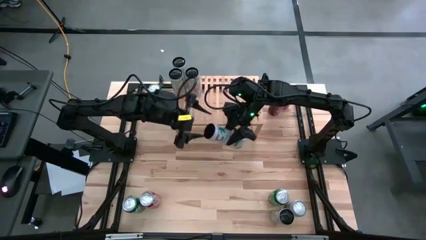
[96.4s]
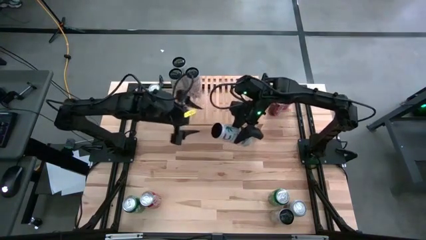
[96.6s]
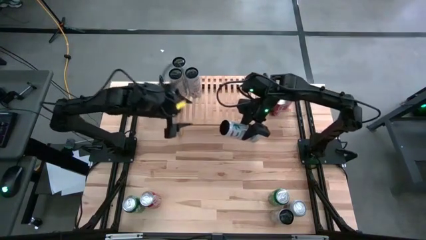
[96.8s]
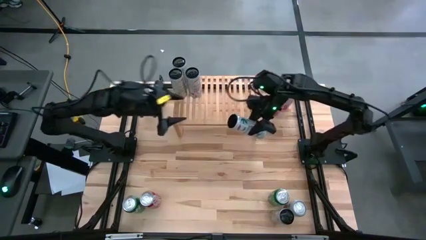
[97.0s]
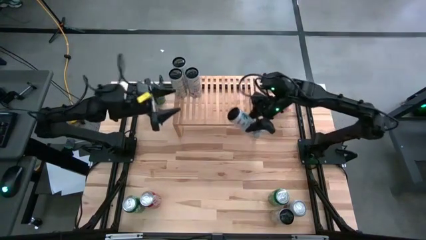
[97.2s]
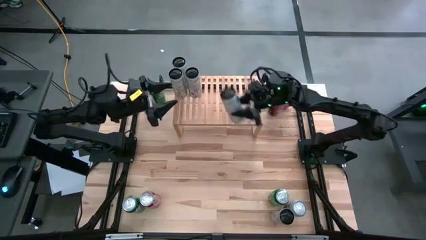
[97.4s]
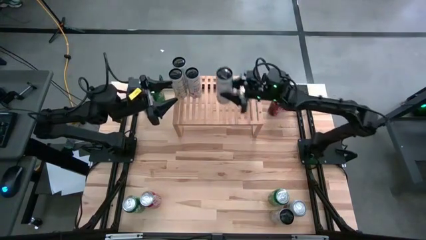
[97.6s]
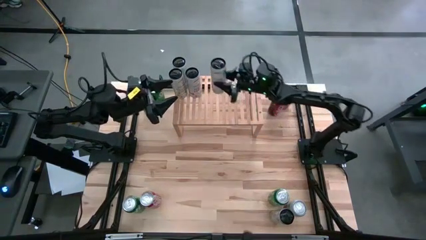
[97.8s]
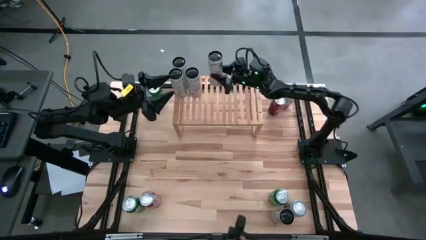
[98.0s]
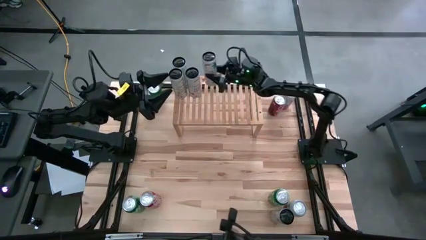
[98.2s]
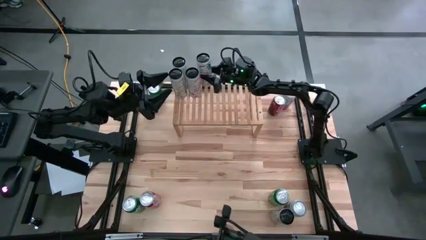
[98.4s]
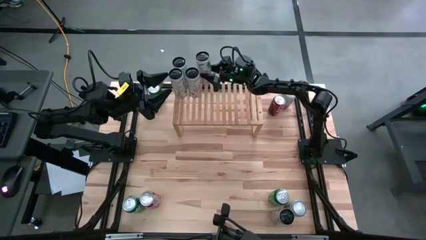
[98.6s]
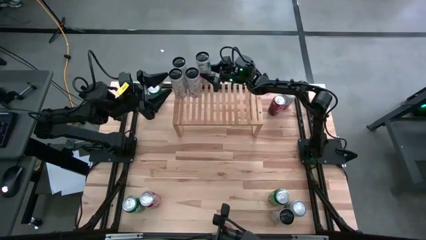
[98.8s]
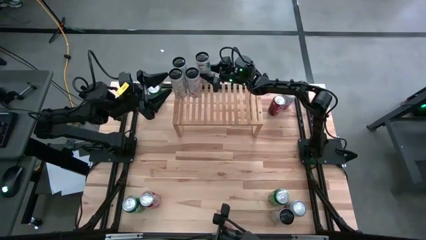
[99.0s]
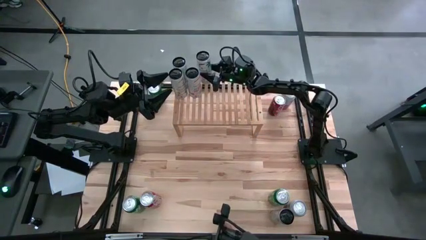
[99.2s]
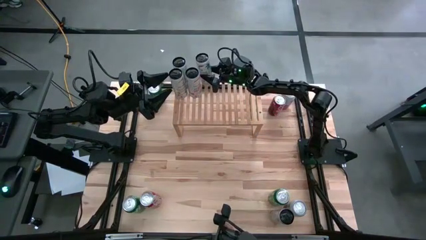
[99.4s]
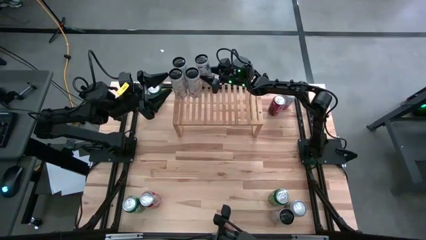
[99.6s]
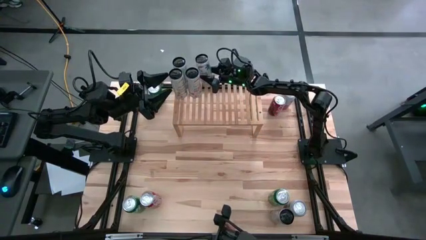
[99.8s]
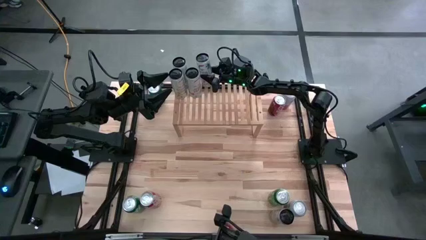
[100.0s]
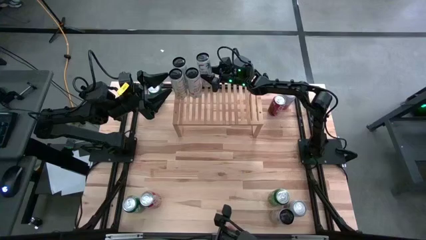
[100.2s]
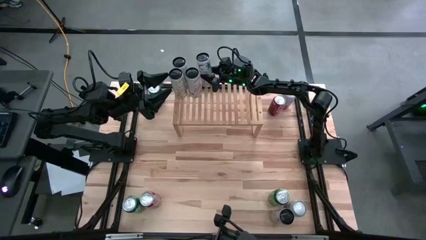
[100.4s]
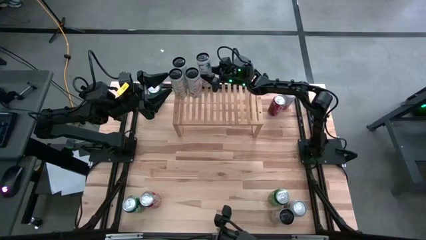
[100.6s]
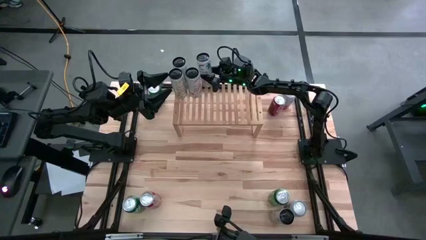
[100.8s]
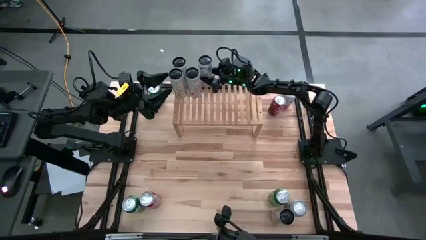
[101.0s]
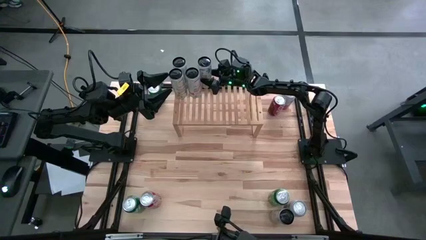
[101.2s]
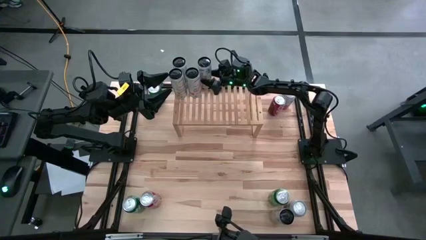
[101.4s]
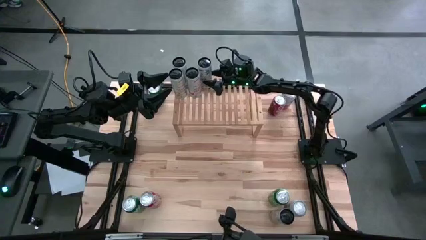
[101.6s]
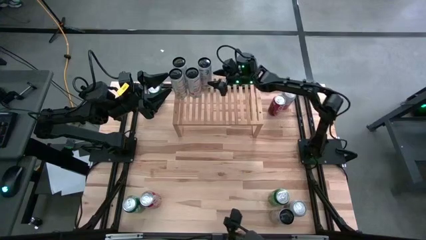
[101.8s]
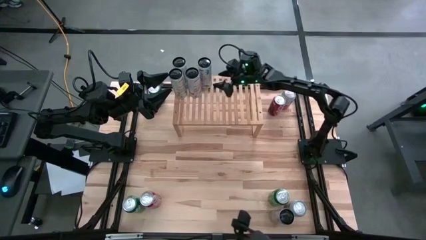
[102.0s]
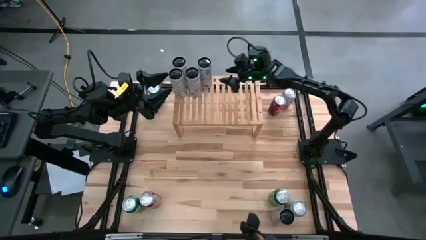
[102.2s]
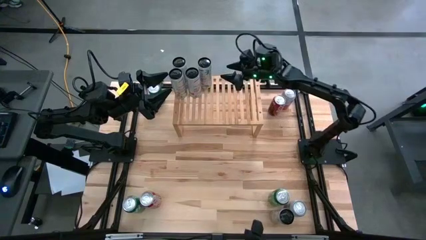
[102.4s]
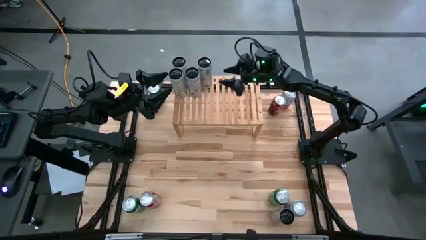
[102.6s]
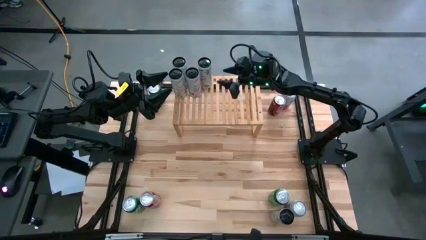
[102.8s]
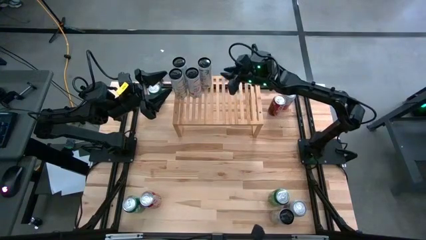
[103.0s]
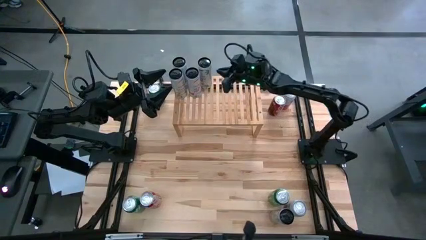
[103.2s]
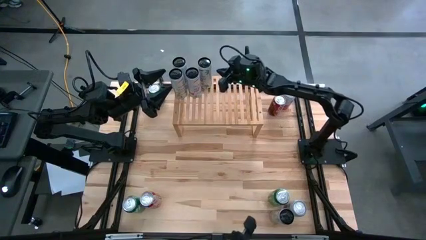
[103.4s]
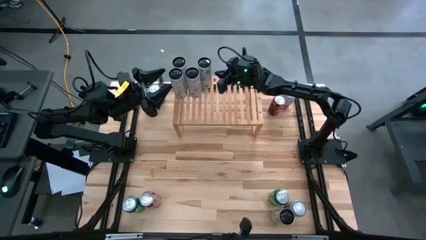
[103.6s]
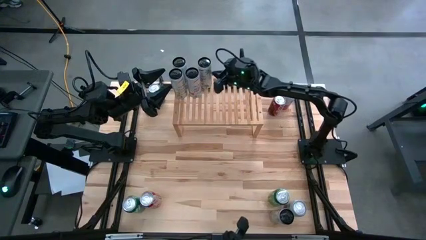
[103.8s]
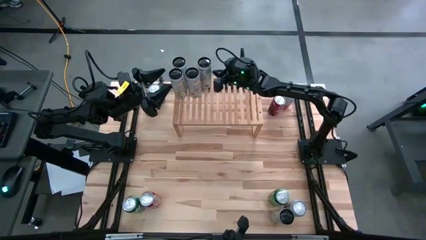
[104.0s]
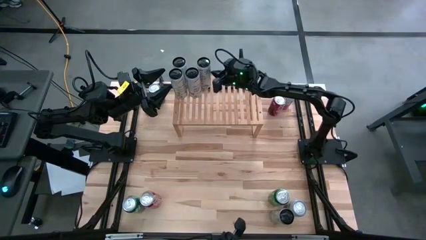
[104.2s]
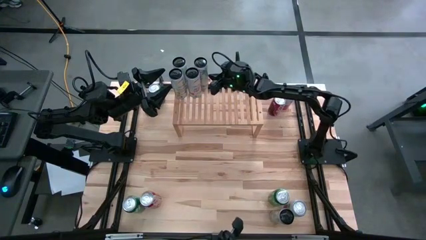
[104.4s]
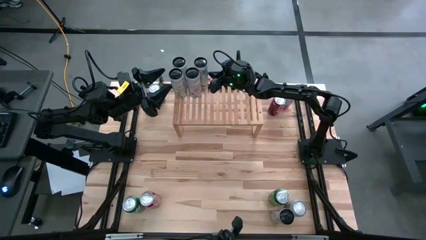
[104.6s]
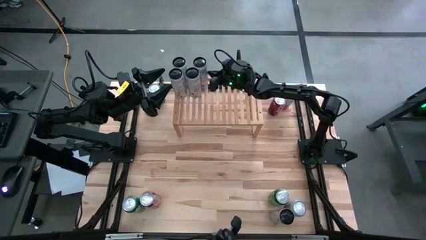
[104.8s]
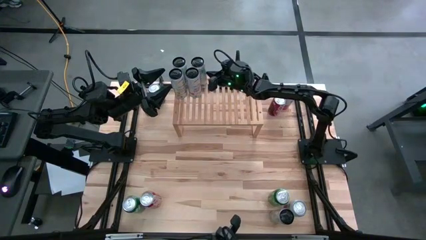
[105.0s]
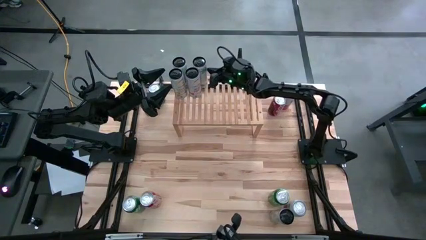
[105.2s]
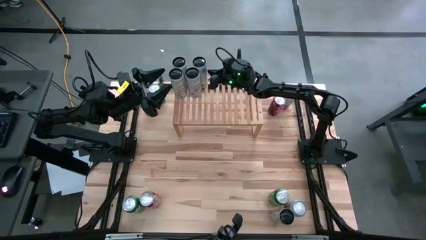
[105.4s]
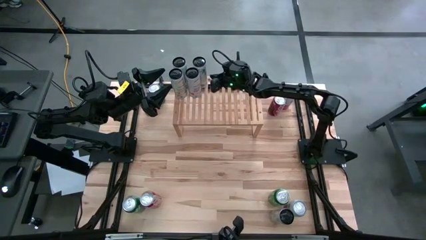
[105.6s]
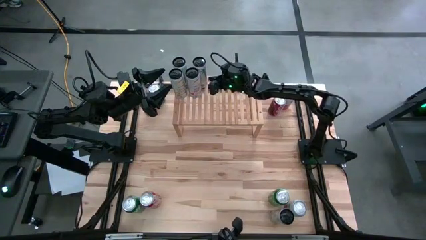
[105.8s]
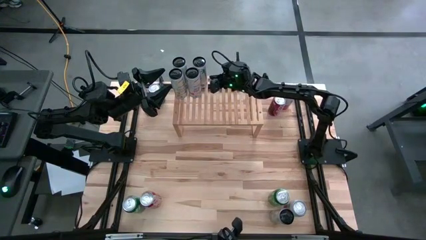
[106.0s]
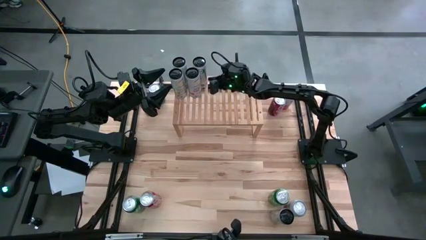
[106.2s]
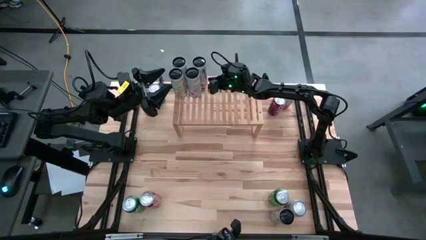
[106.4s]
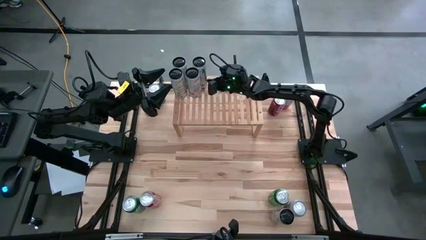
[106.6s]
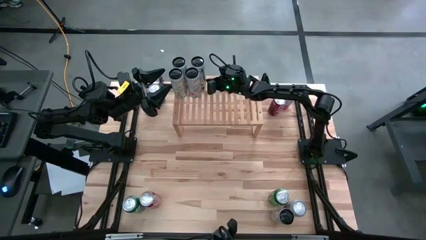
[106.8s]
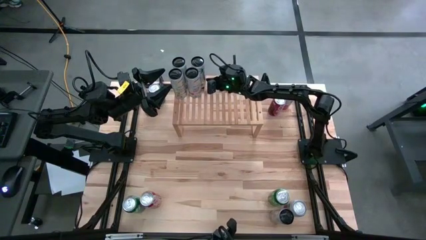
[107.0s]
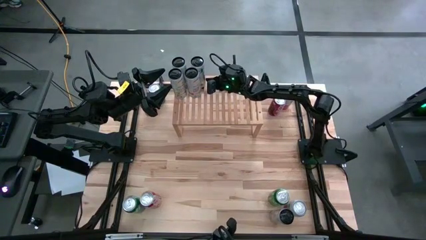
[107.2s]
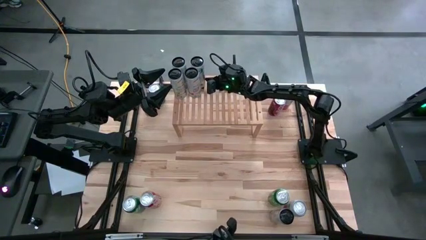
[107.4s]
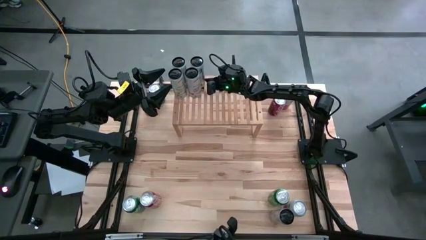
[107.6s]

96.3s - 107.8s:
Task: Place canned beverage on shelf
Put the top white pink soda can on the shelf aligned with other white pink soda can
